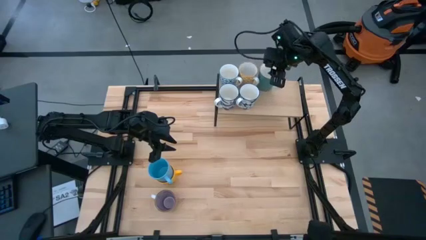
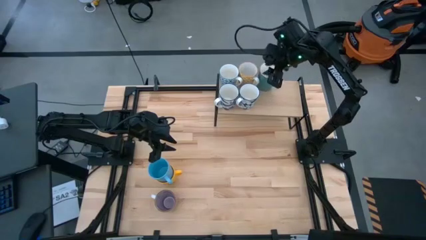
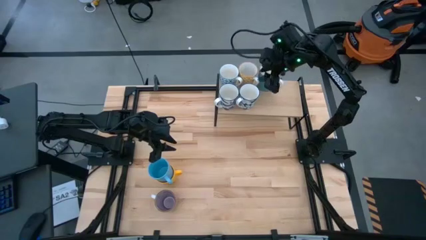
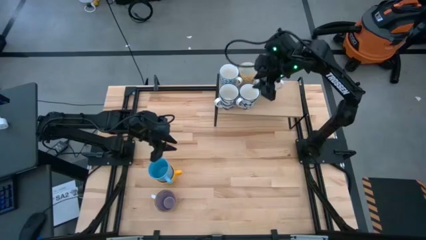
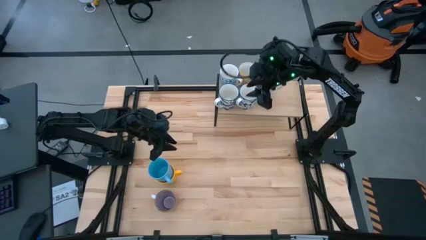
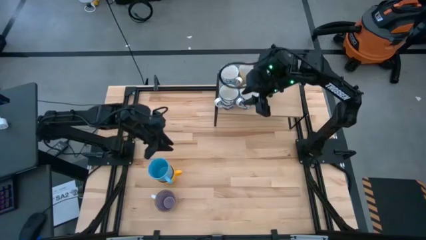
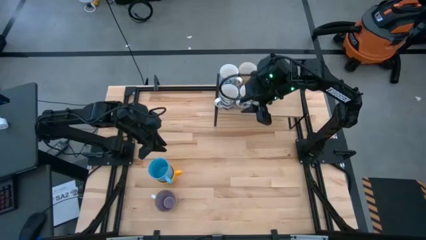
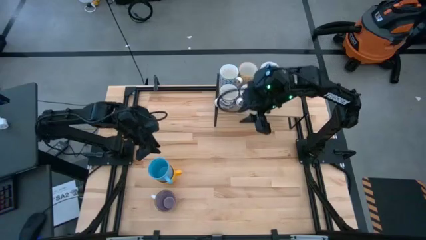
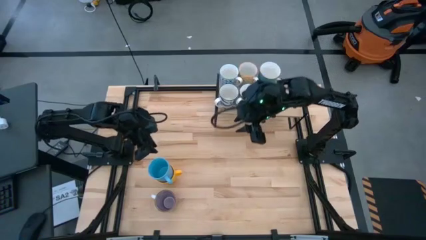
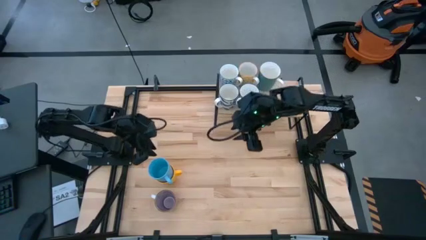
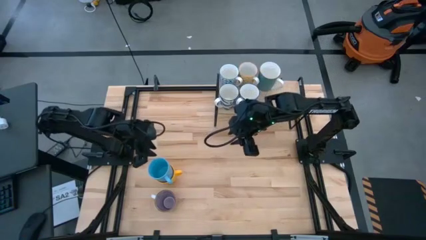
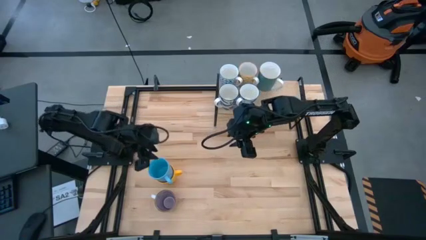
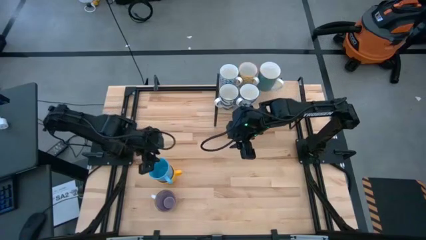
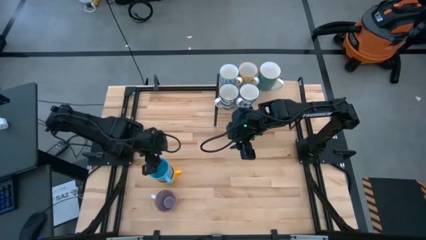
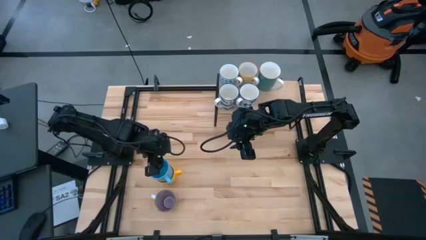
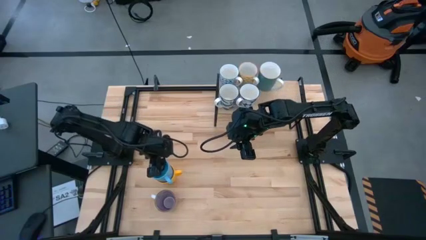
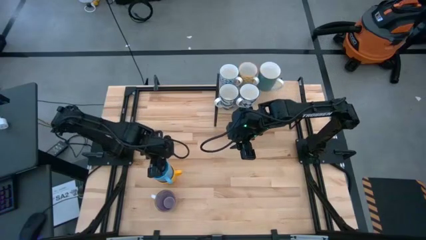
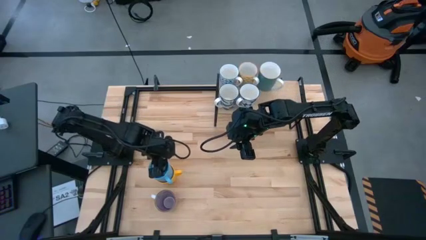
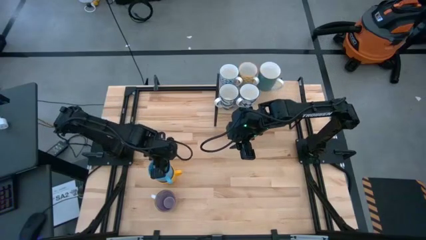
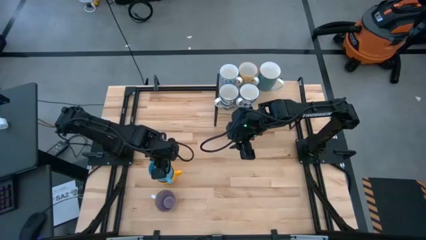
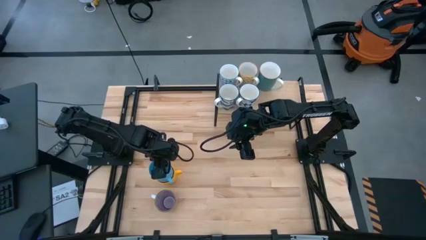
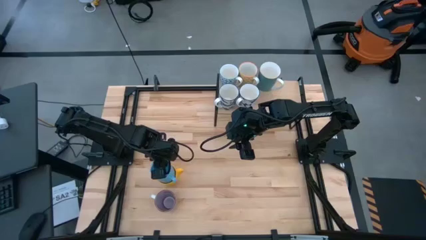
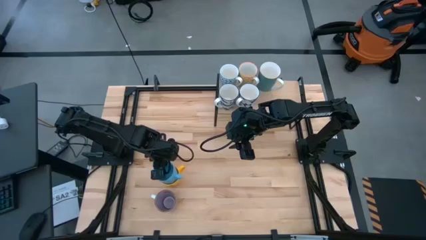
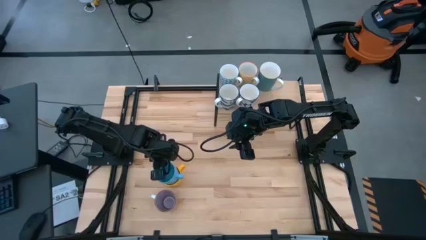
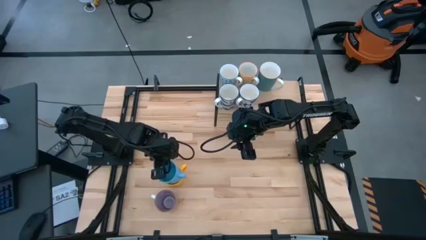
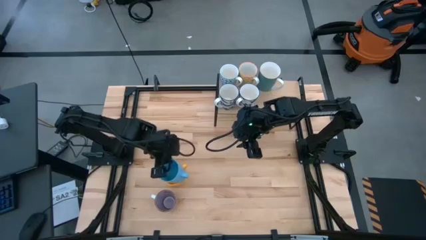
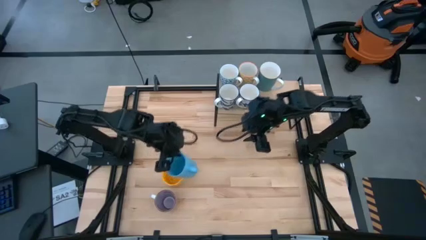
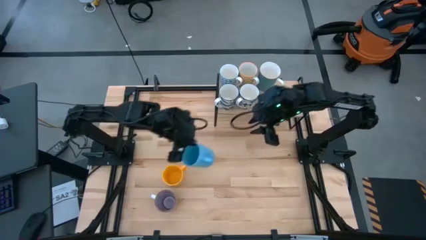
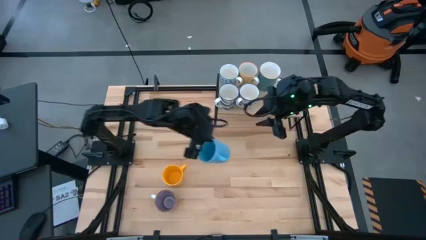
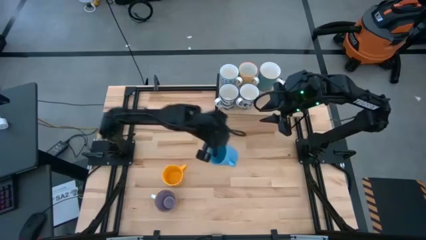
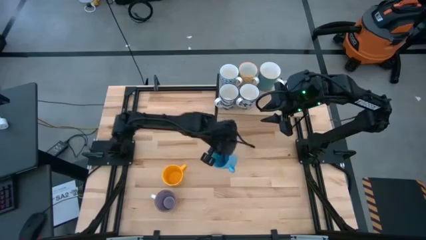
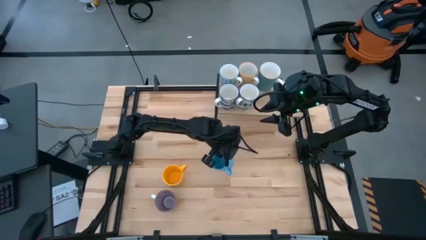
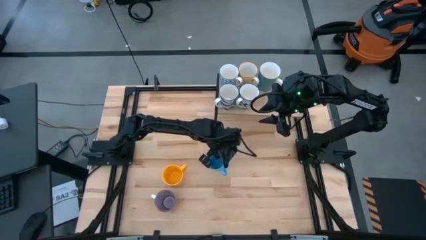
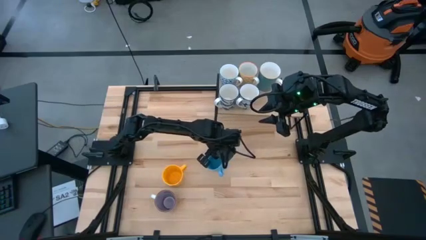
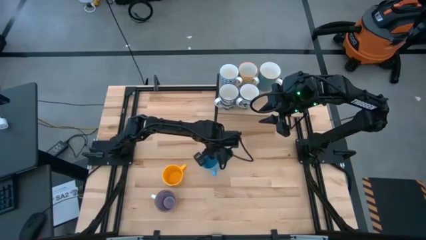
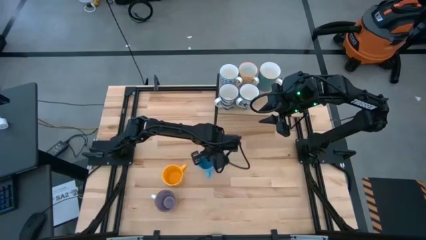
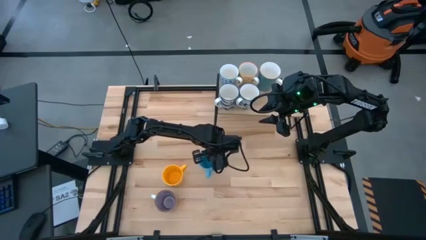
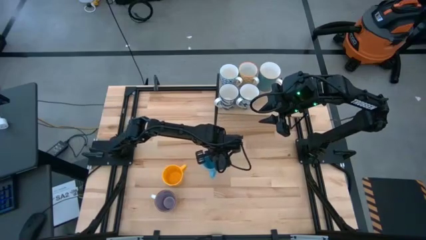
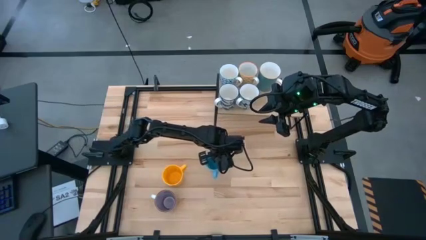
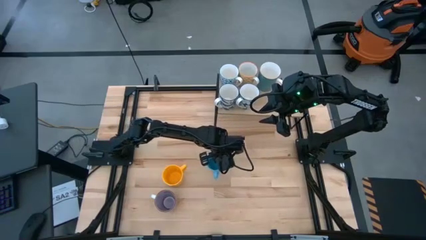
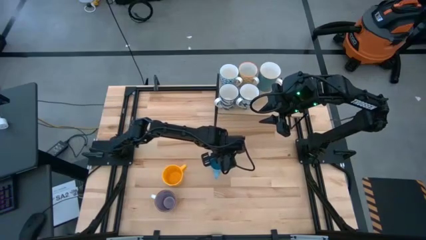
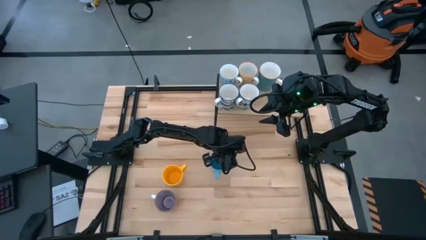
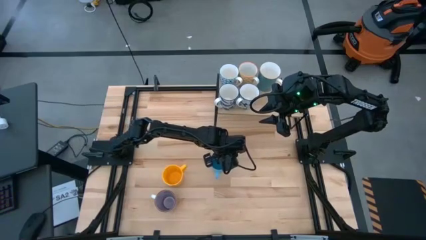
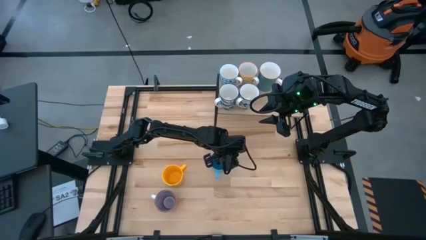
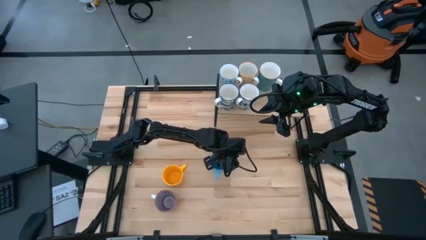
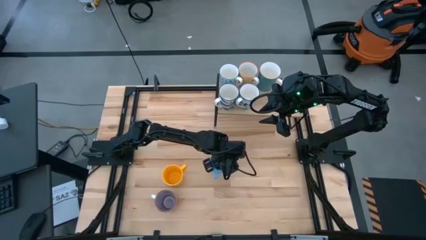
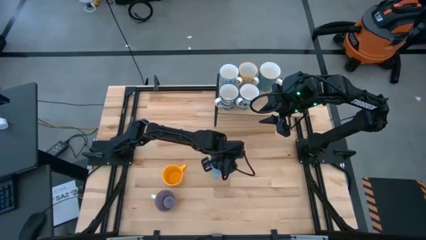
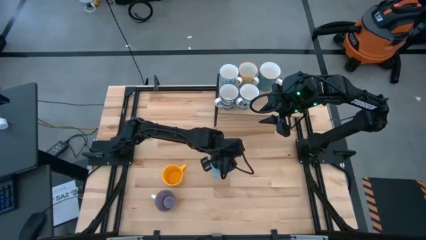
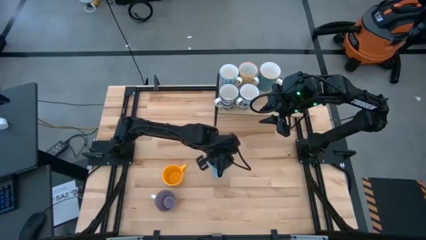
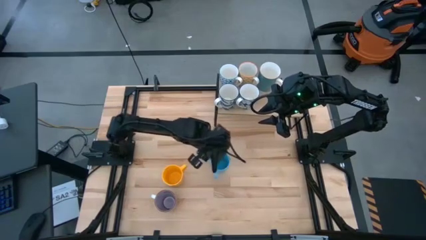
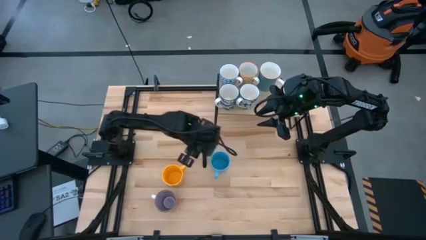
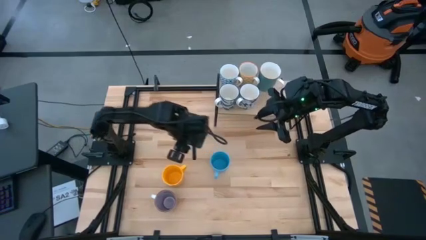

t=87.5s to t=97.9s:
Task: Place coffee mugs
Put the light blue mug on the shelf

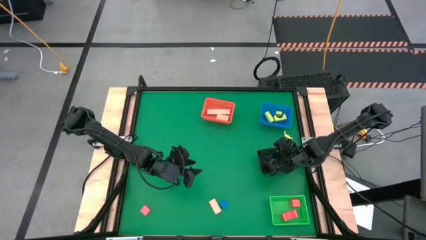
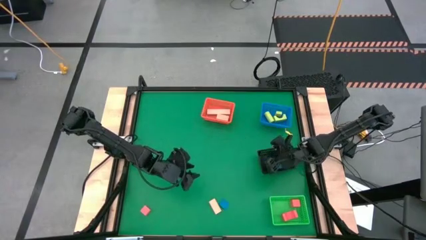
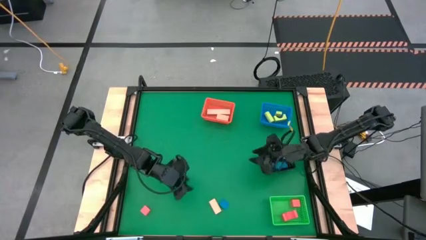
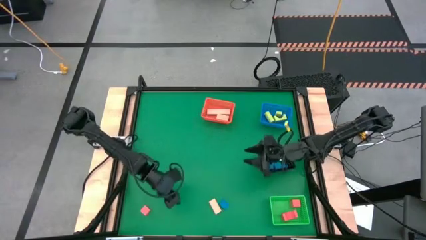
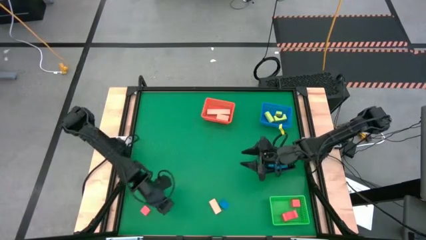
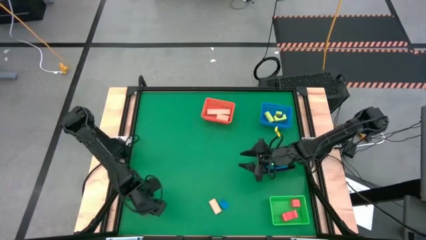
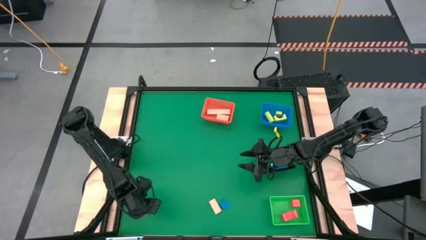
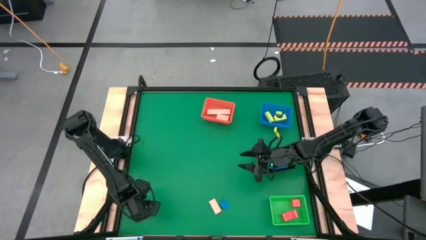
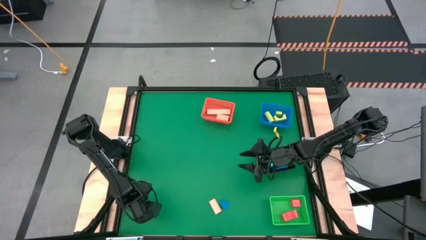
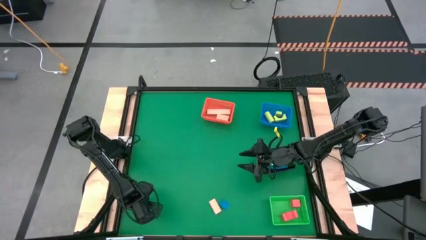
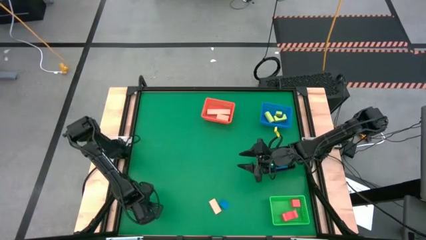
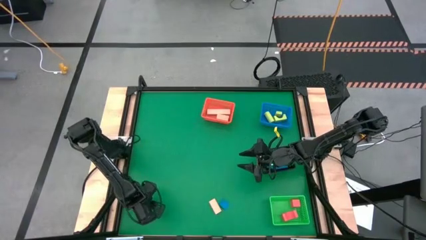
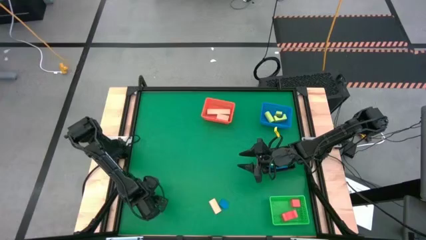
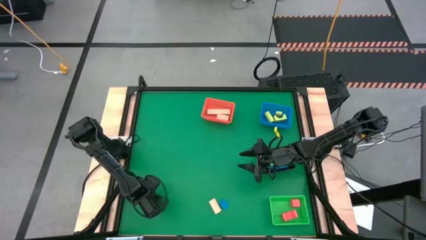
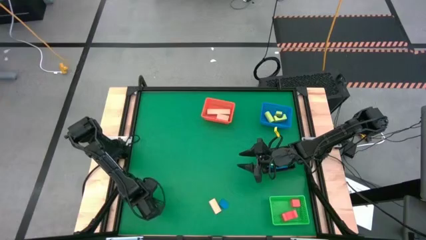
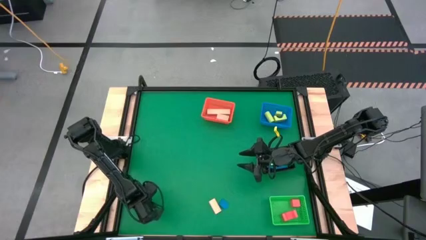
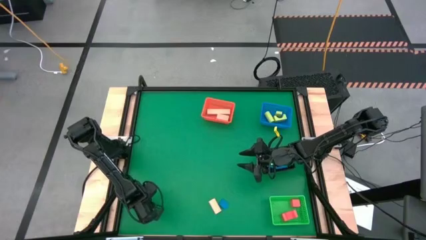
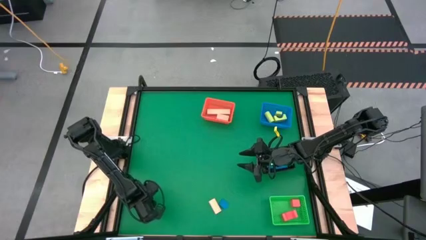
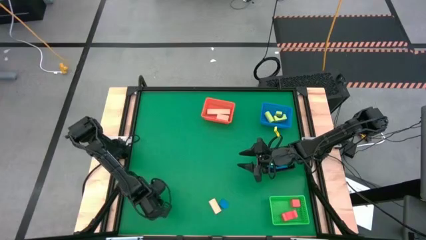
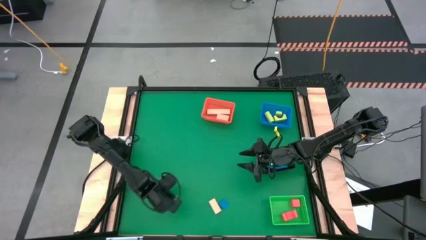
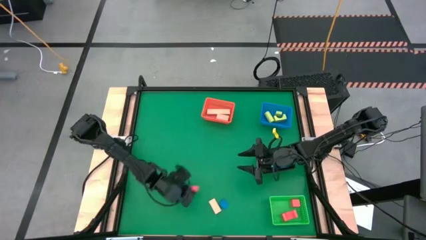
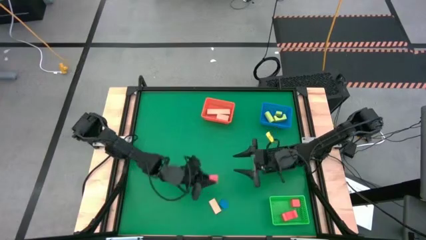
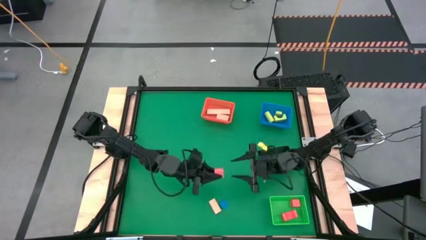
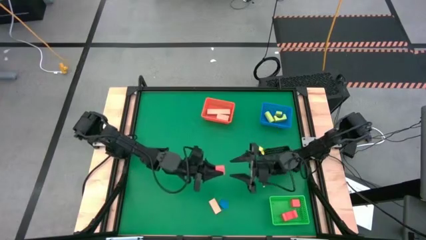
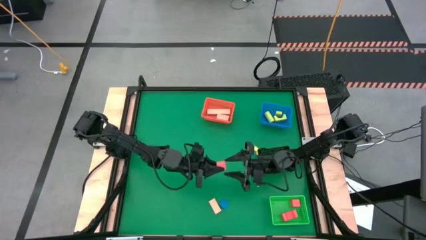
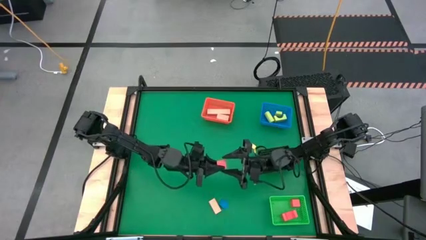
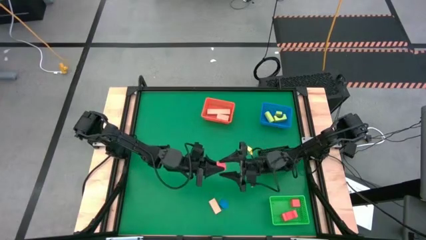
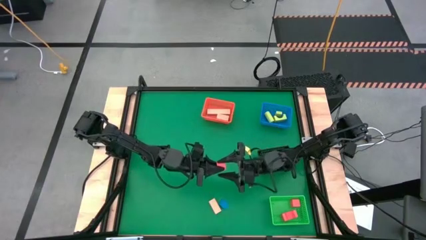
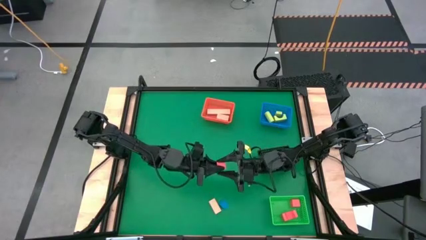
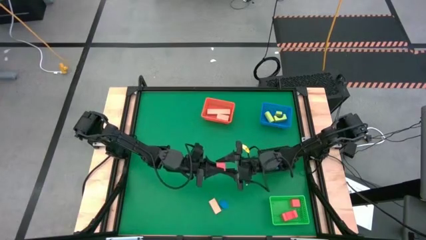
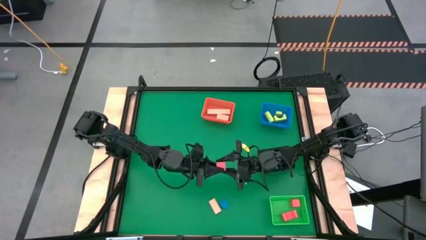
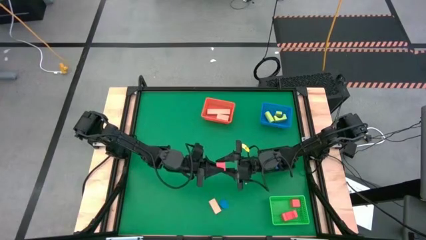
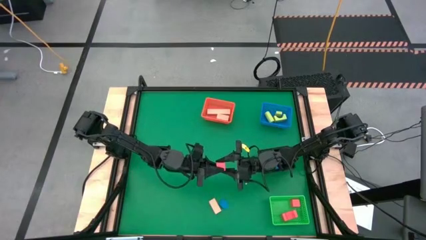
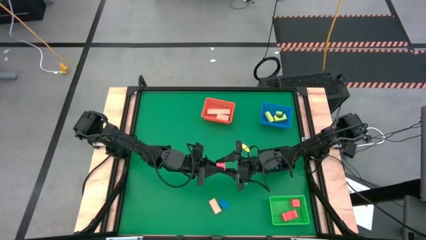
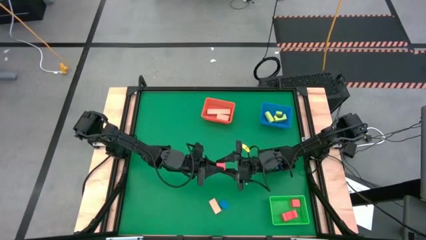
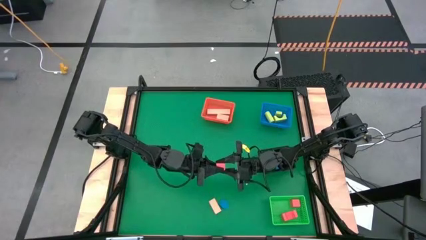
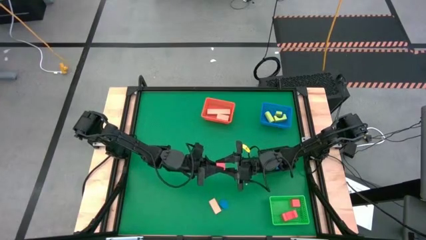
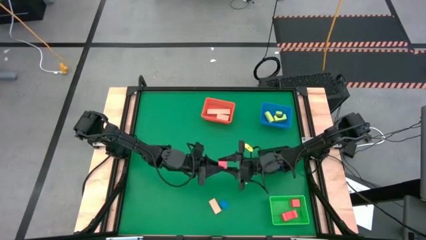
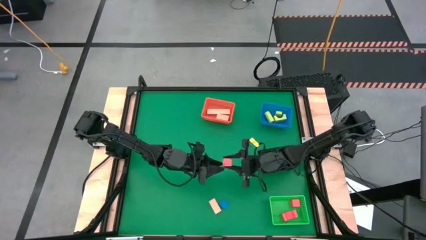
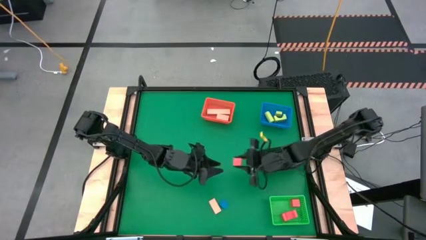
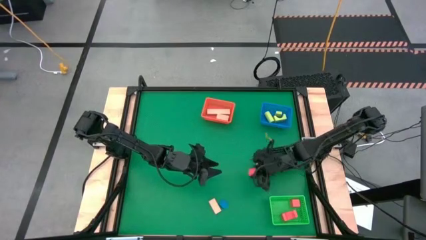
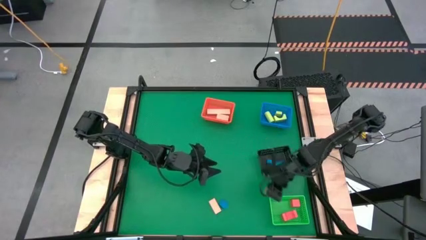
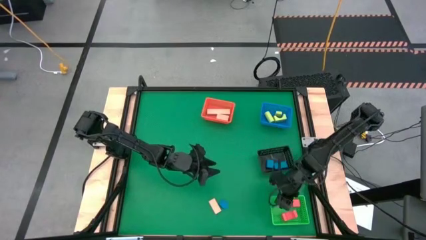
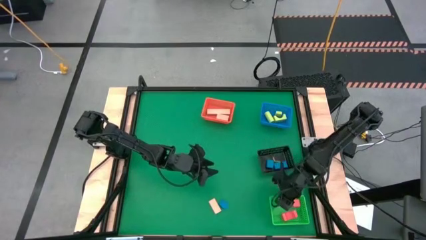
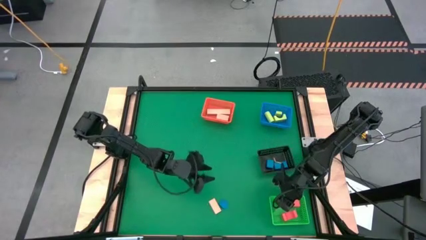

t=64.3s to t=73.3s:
Task: Sort & place blocks by color
Put the orange block into the green bin
